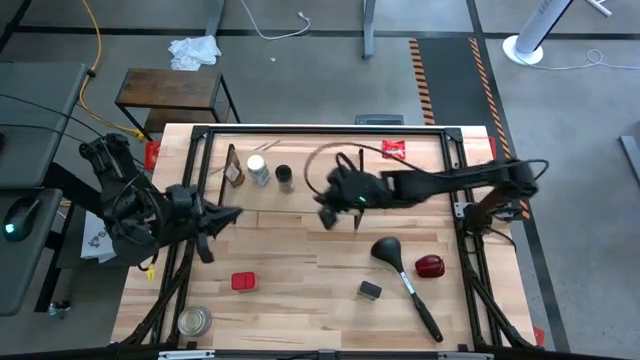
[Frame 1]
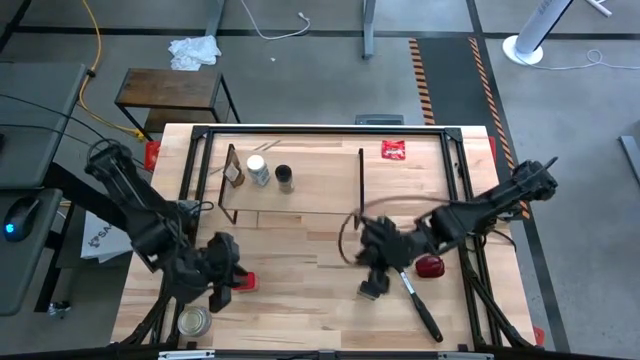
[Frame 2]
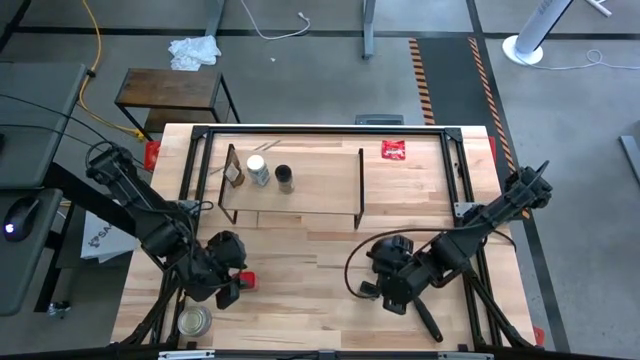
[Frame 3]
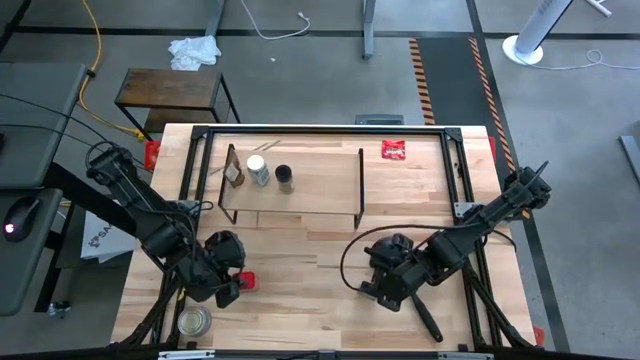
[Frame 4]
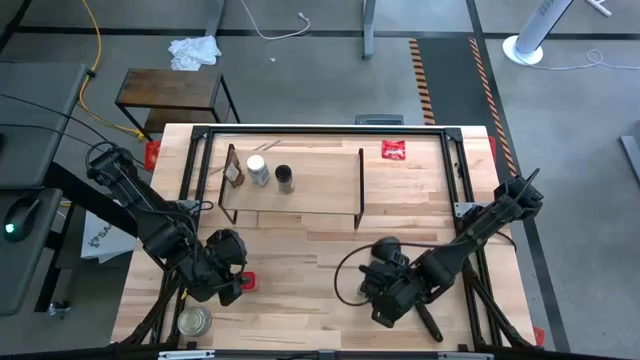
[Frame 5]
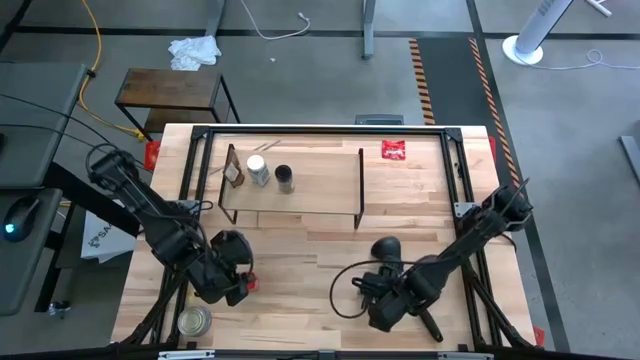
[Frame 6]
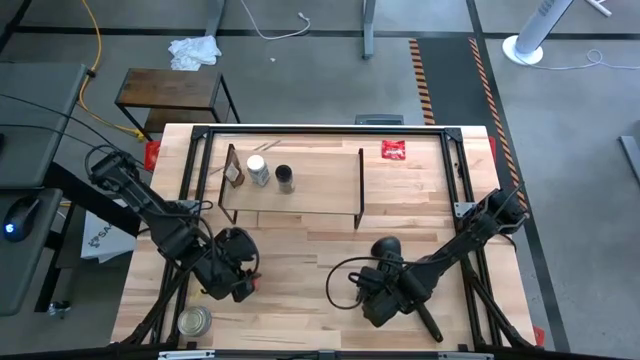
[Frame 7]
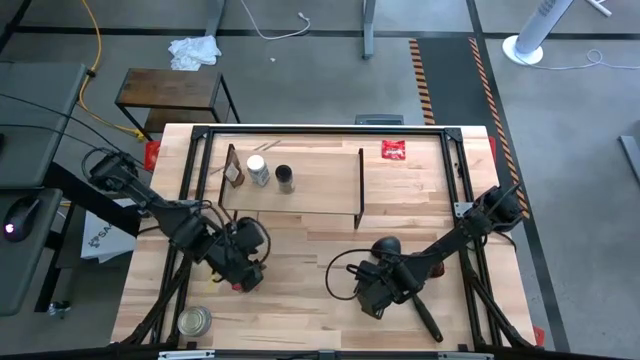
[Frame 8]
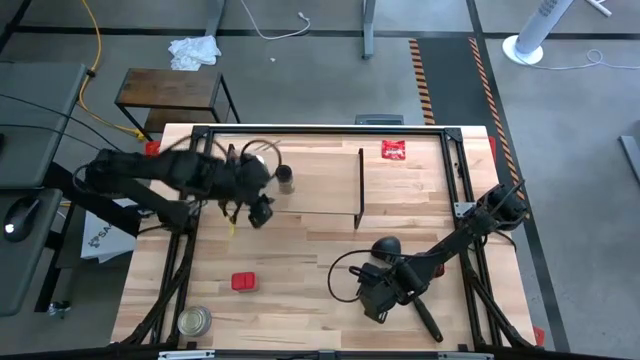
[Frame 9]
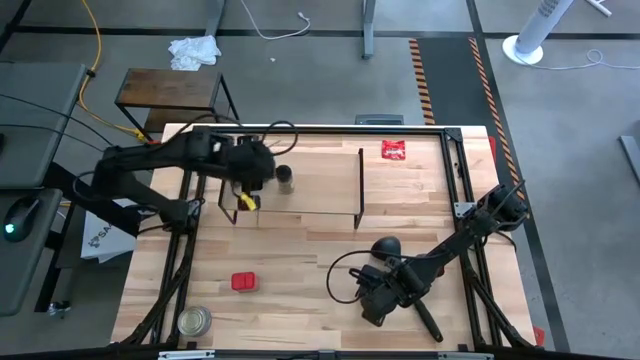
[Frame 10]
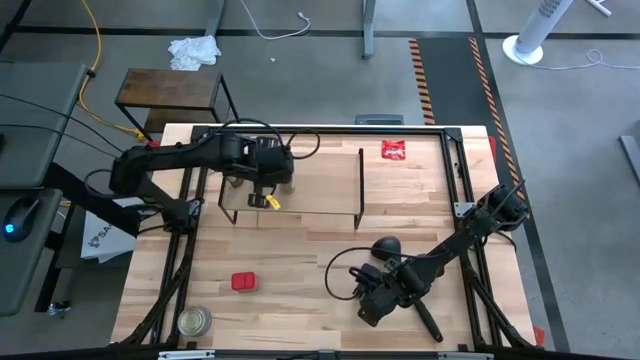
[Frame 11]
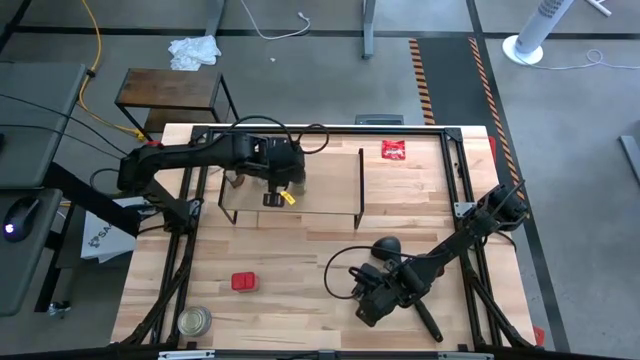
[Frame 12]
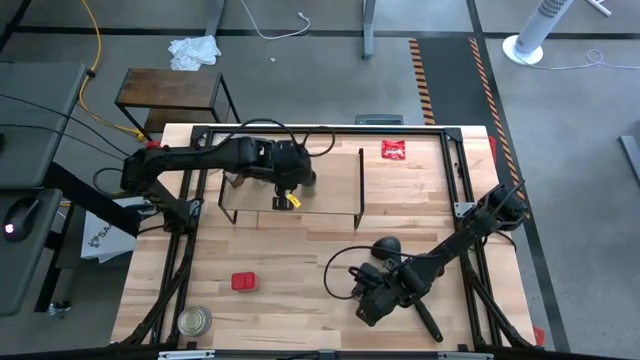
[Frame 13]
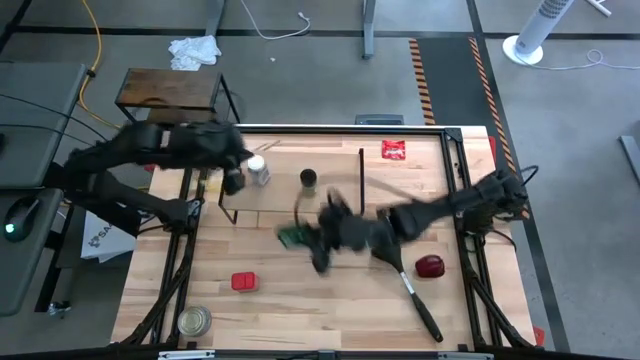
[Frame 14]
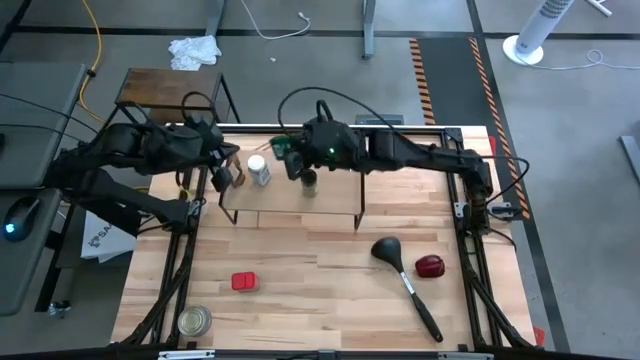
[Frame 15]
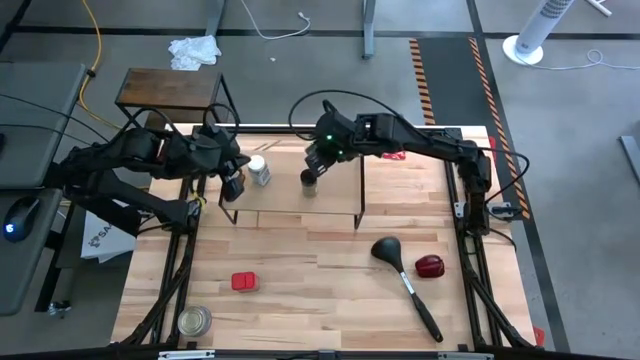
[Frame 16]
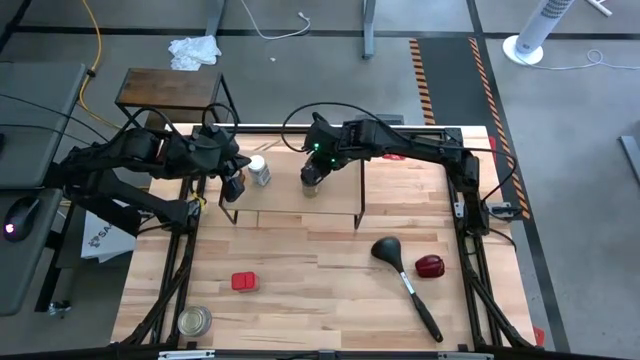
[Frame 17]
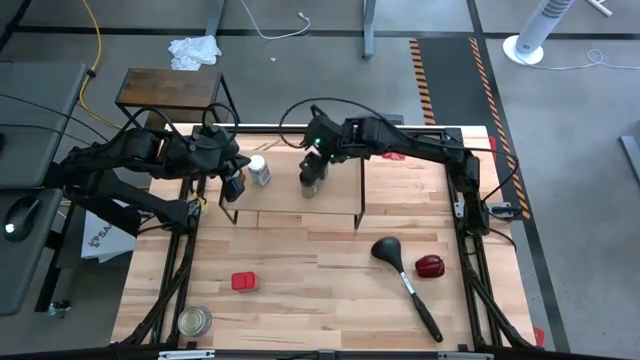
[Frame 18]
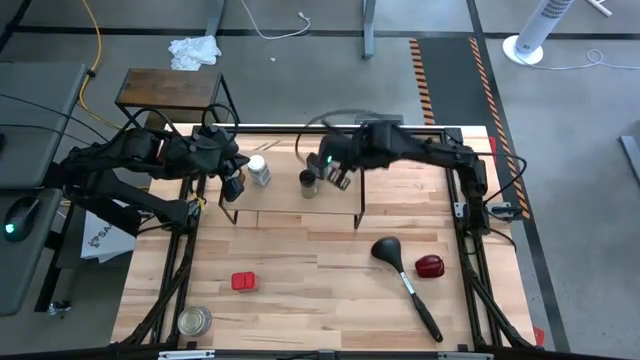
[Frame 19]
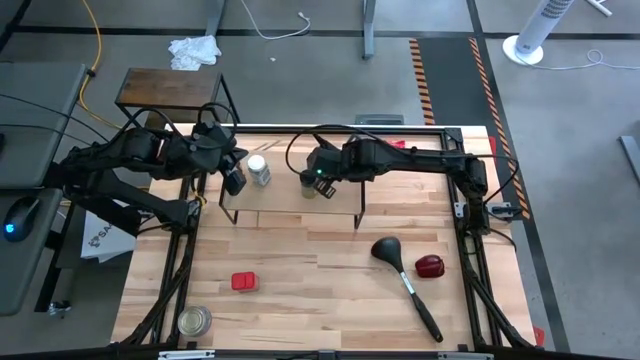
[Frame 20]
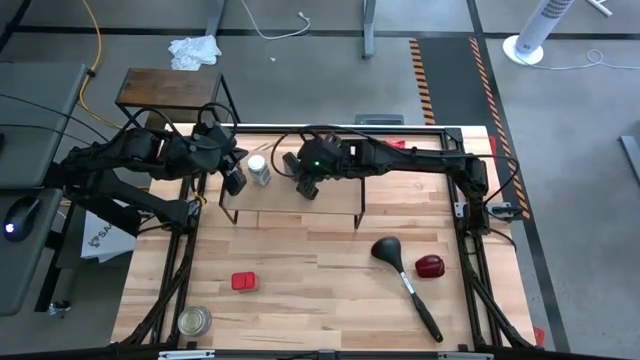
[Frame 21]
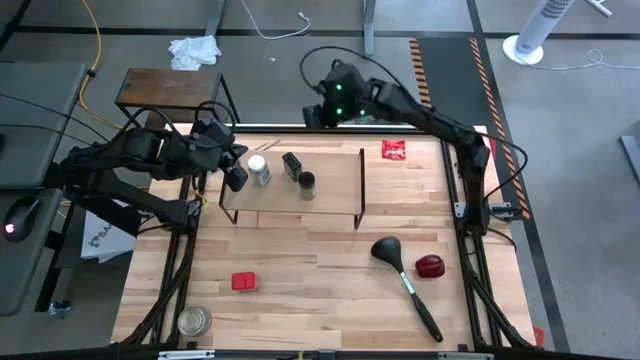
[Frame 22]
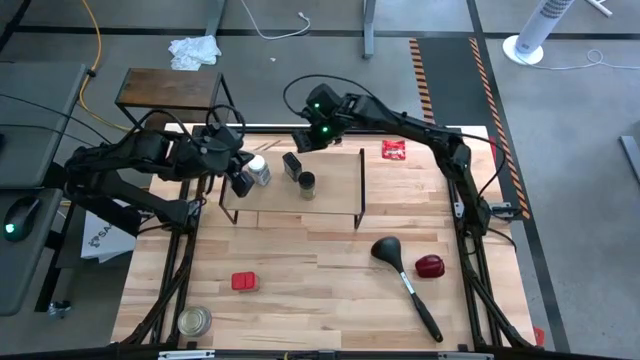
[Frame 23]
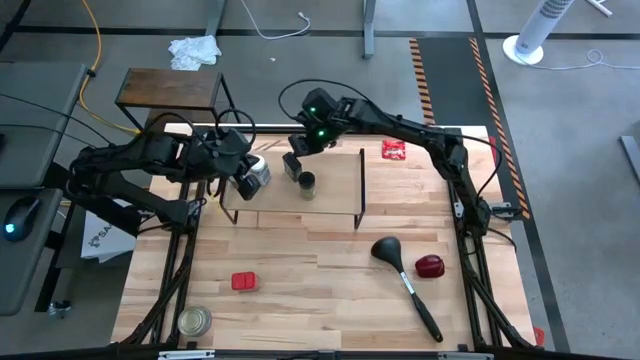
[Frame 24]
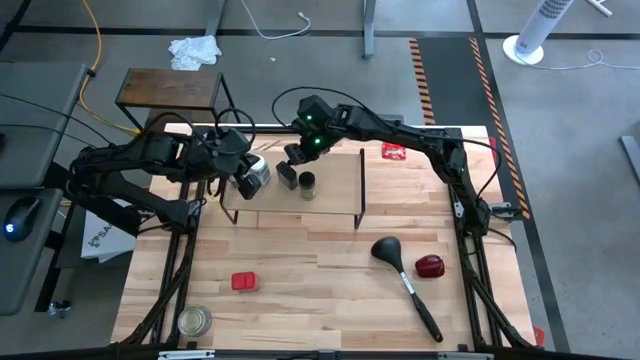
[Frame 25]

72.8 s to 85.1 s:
Task: Shelf spices
Put the black seasoning can on the shelf

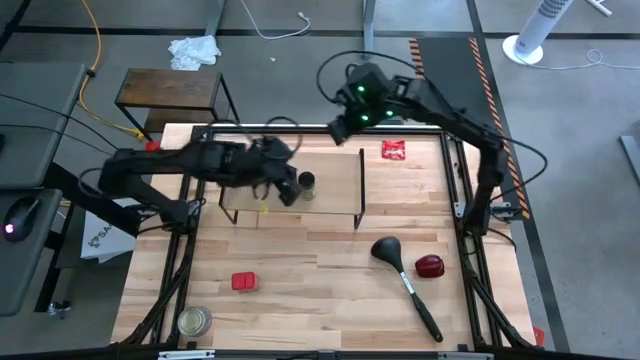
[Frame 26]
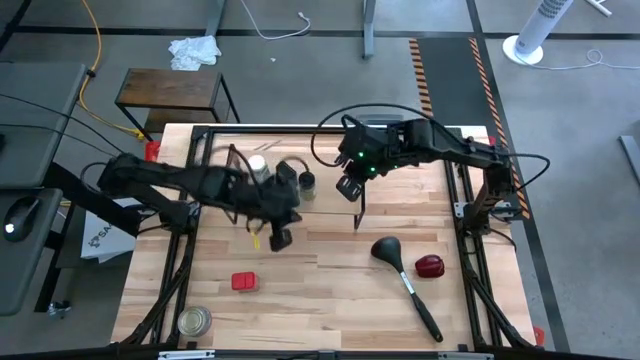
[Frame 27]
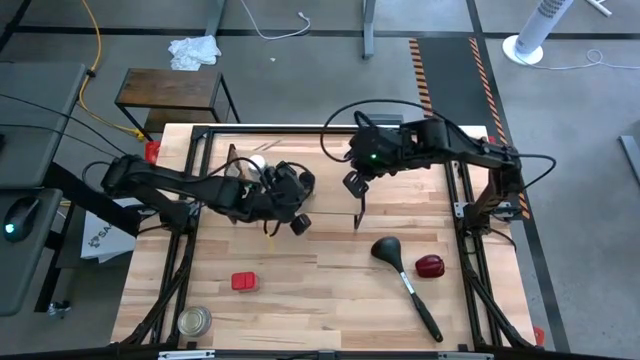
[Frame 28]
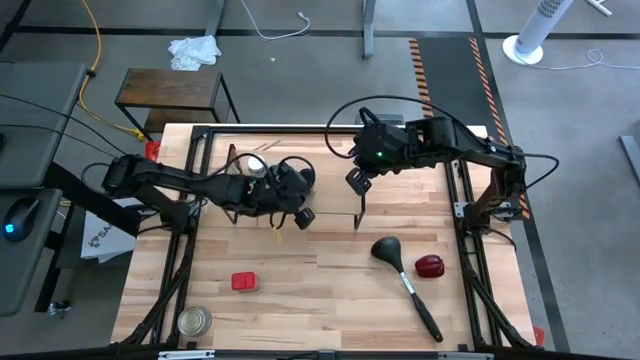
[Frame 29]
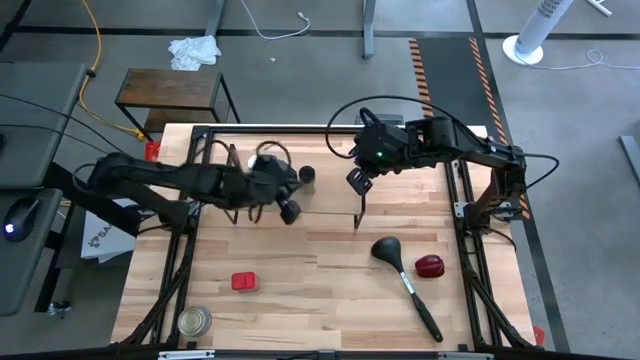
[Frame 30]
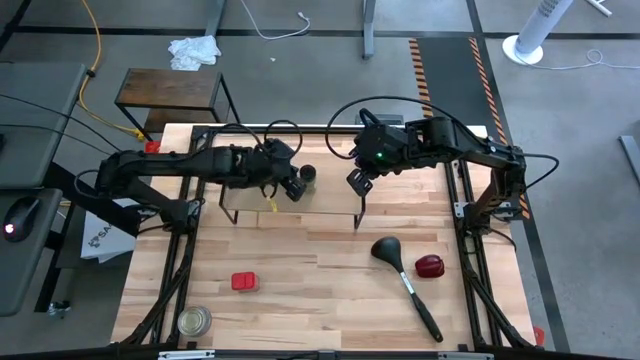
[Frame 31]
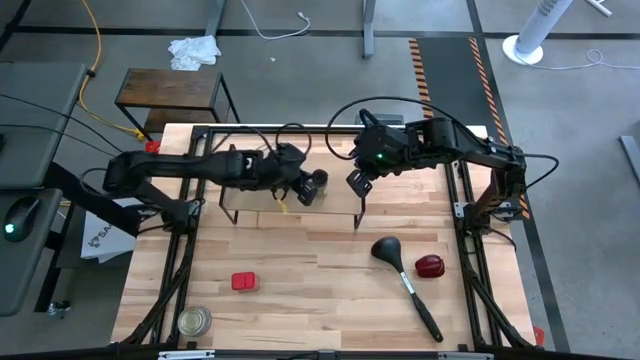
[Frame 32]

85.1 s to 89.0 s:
Adjust the black seasoning bottle

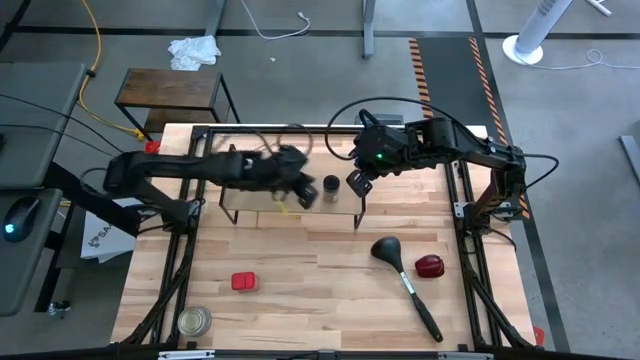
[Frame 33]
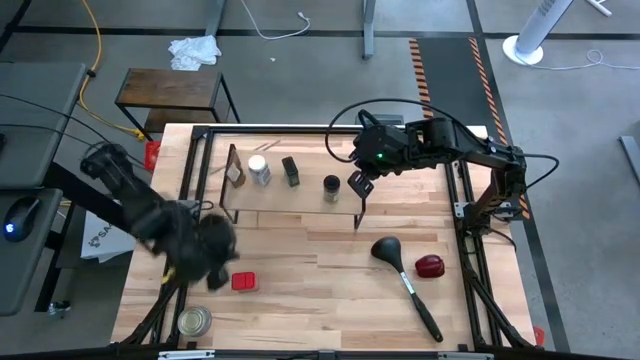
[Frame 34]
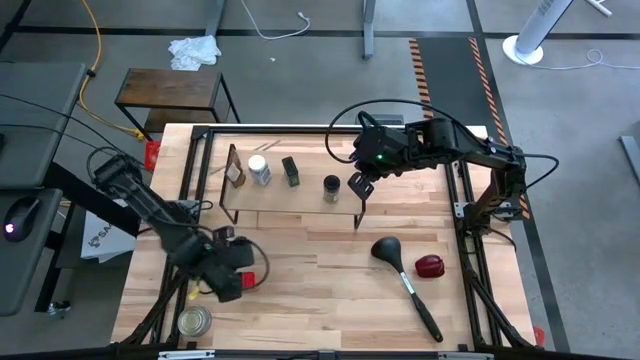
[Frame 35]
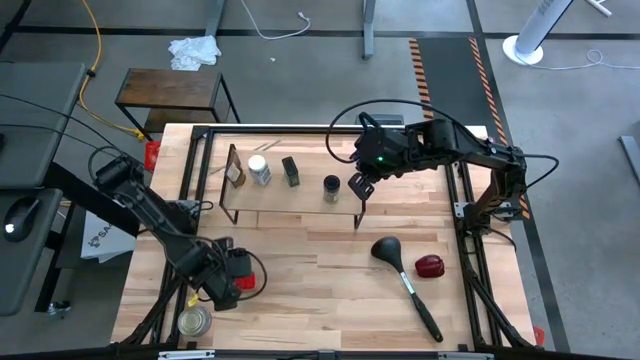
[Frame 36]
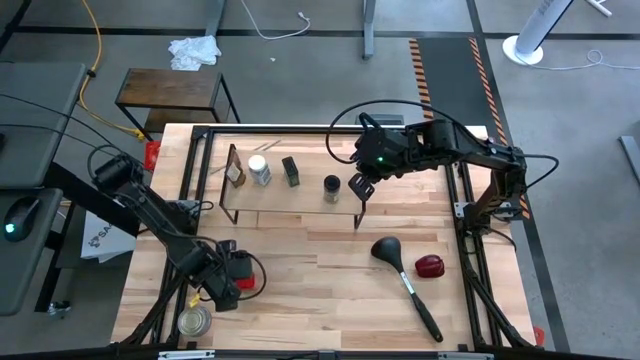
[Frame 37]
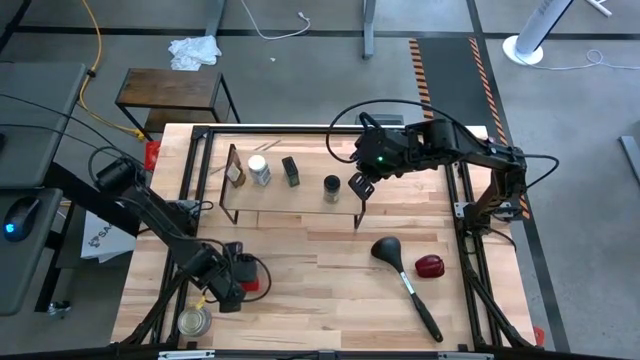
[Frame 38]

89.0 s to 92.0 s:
Put the red seasoning can on the shelf
